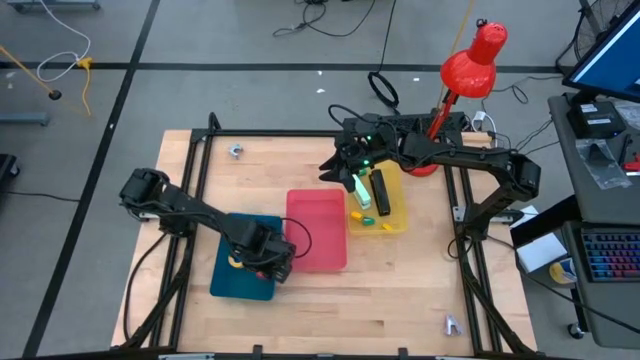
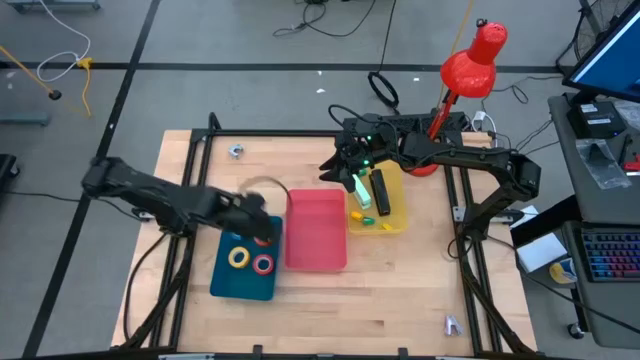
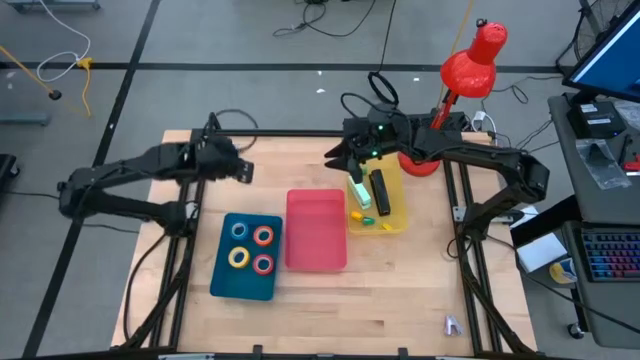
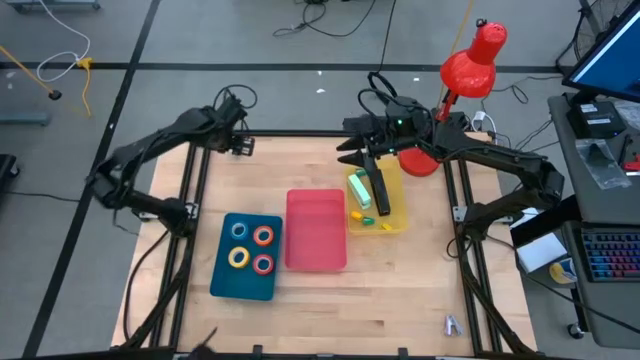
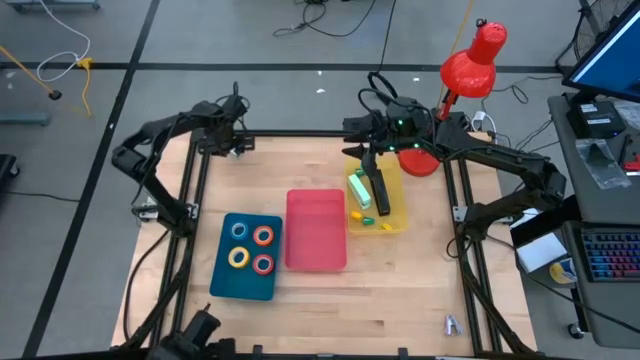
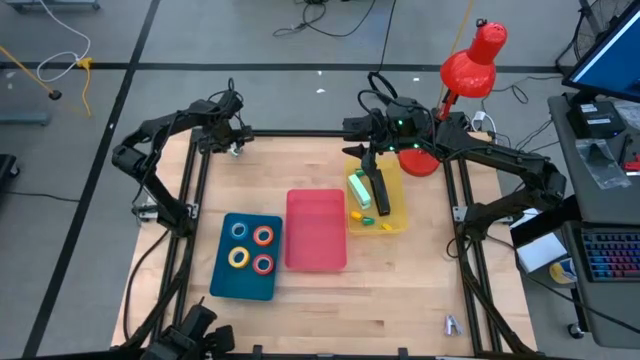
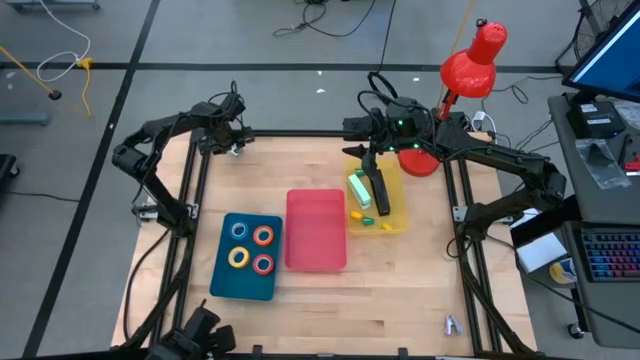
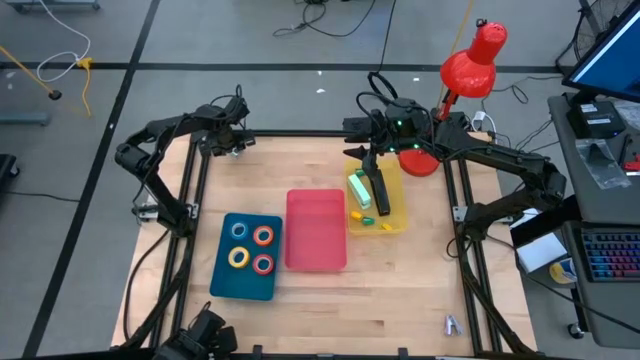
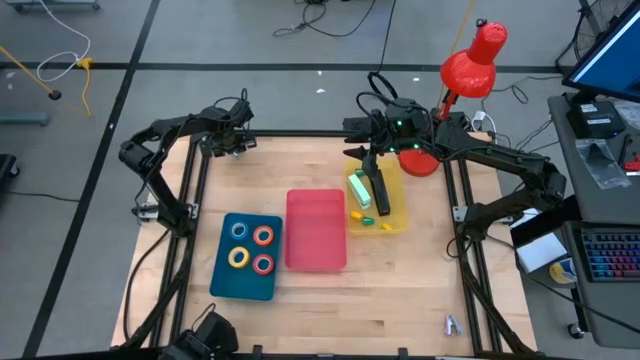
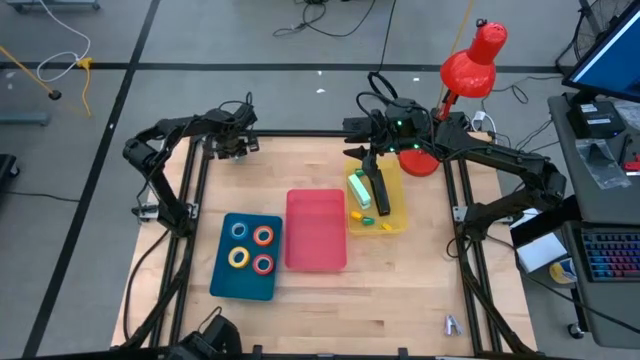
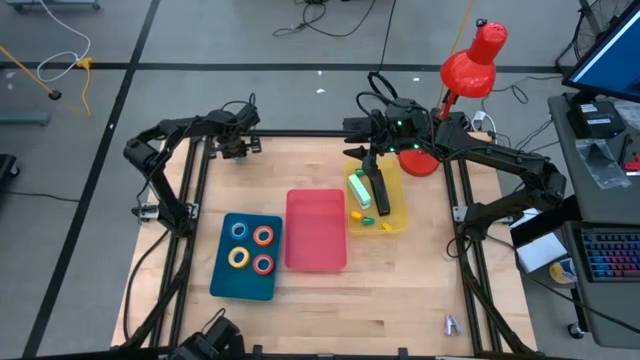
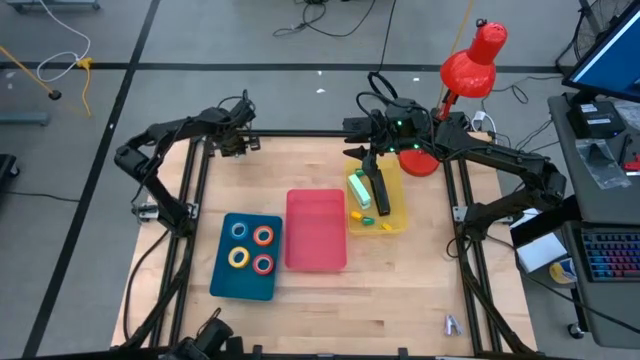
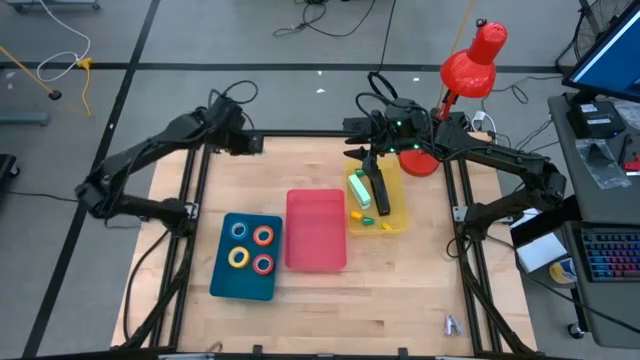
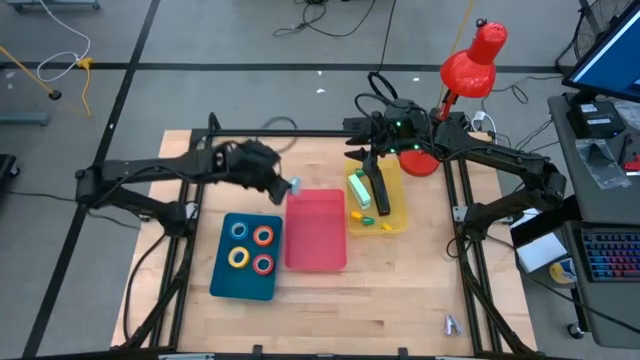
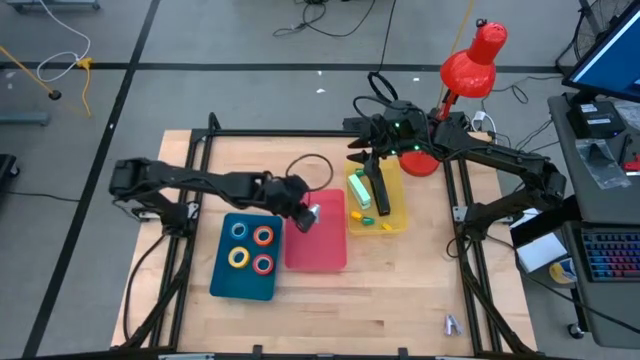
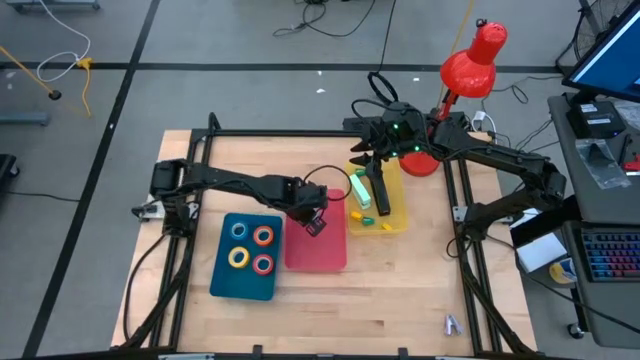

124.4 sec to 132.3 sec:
Task: Pick and place Stapler, Stapler remover, tape
Put the blue staple remover into the yellow bin

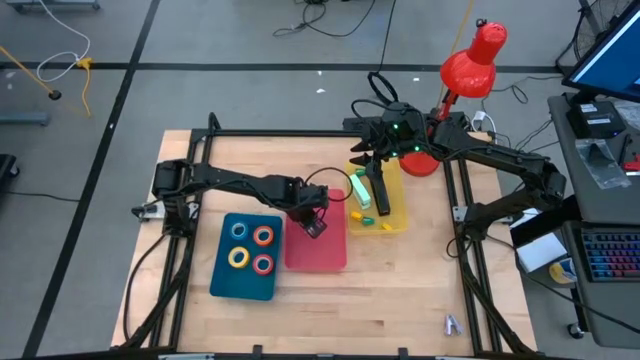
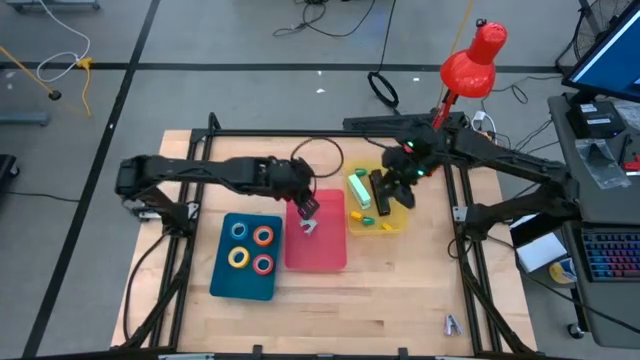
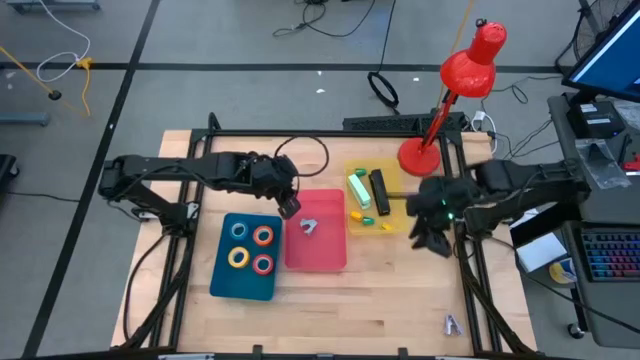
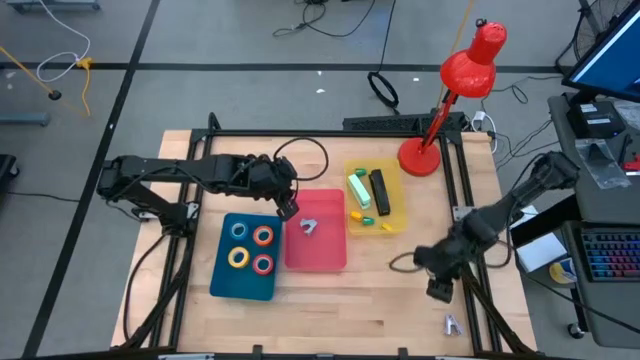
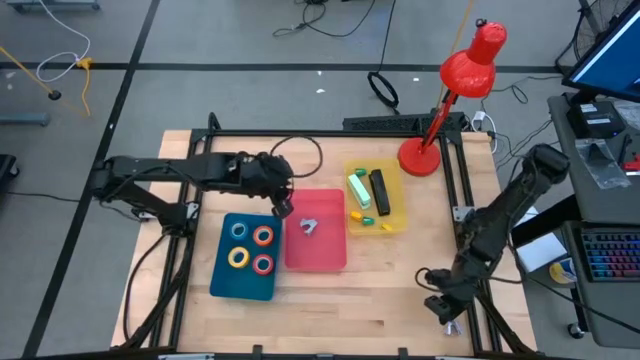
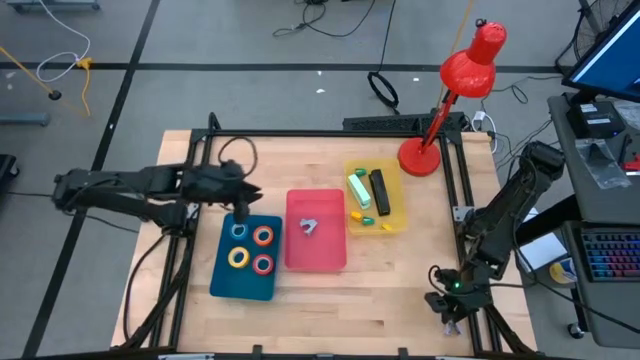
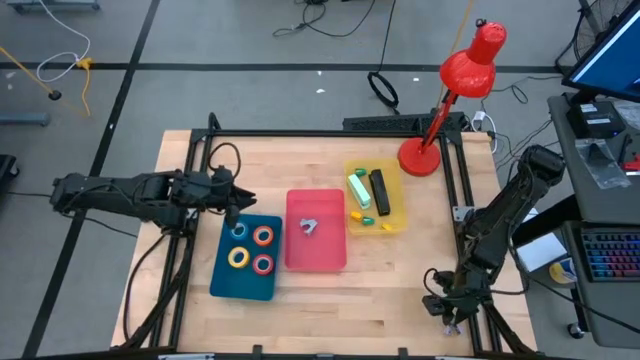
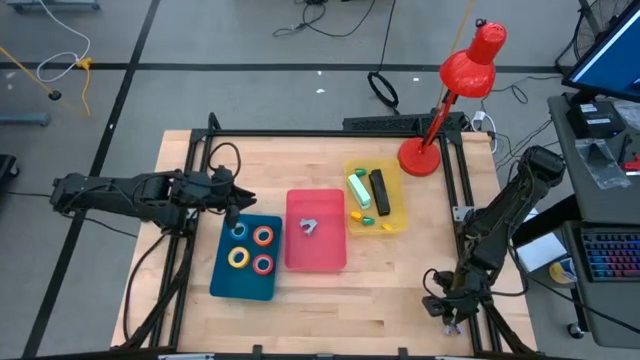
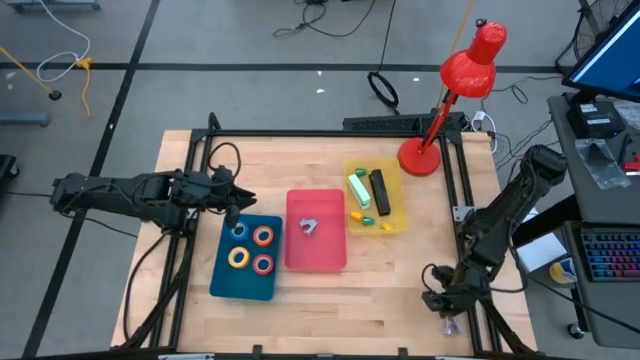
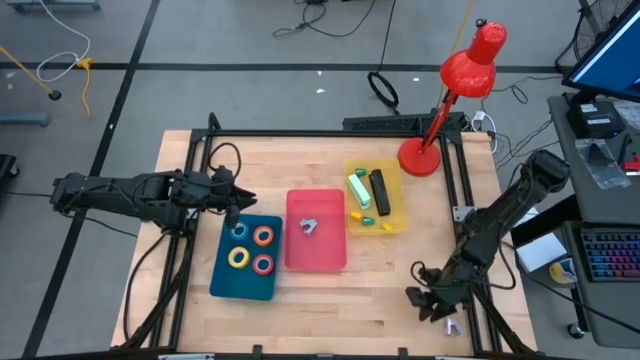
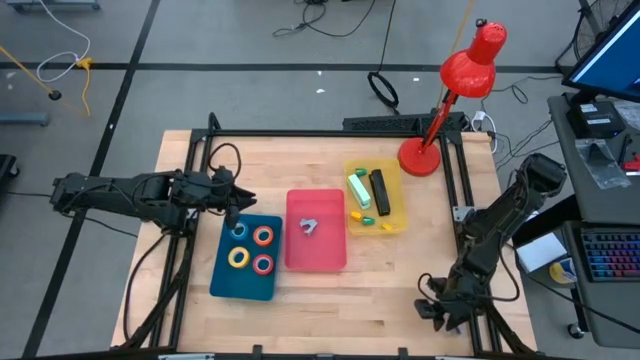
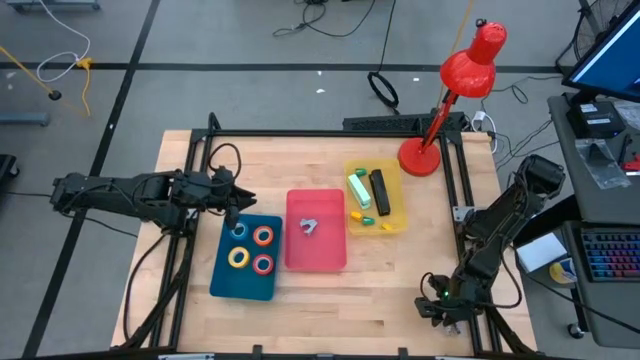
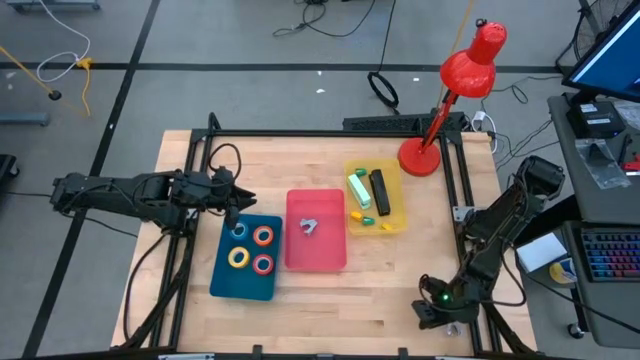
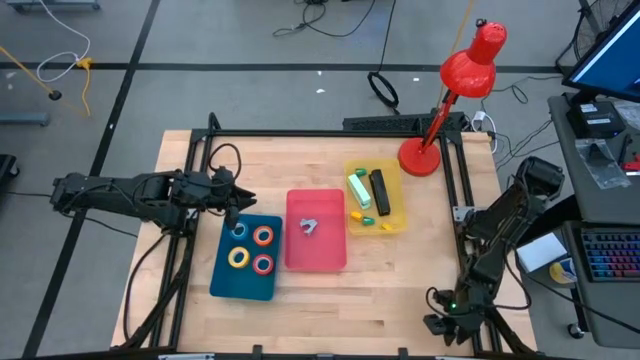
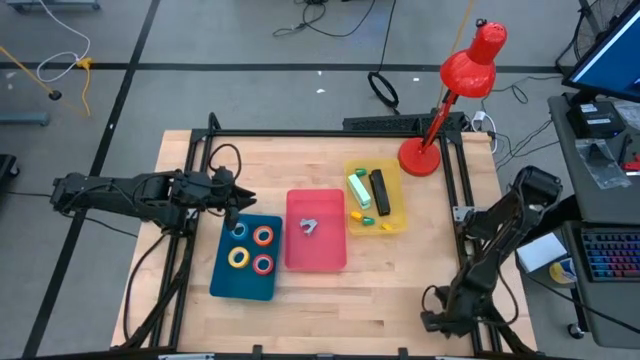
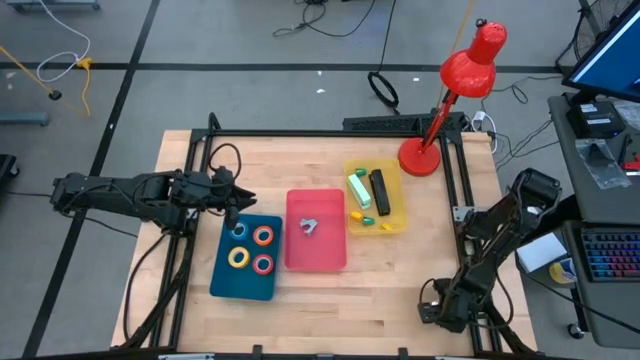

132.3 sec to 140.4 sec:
Put the purple staple remover into the yellow bin

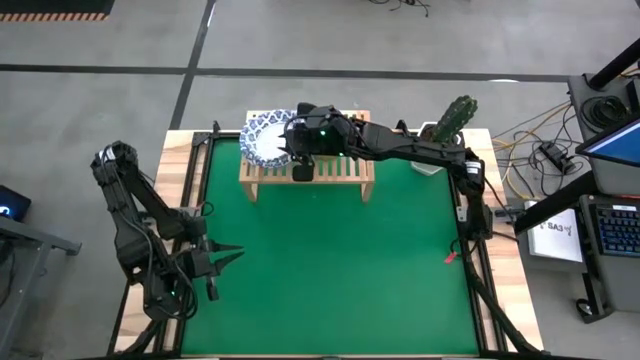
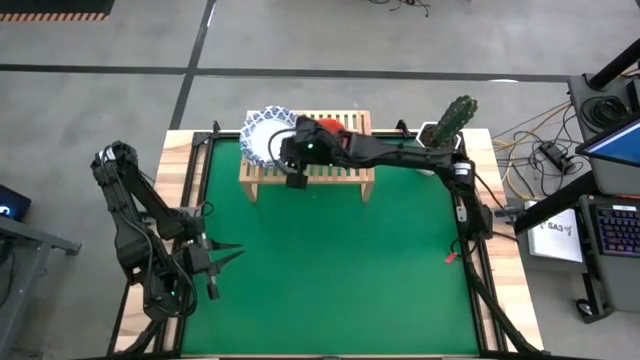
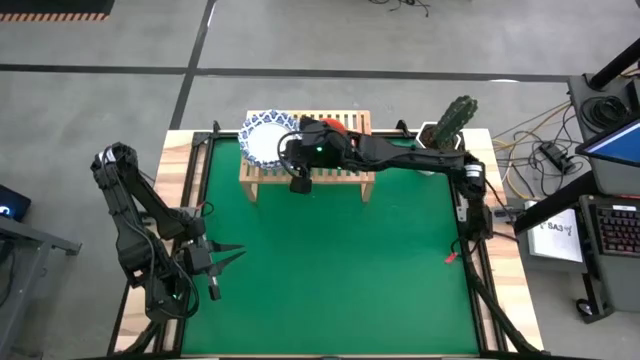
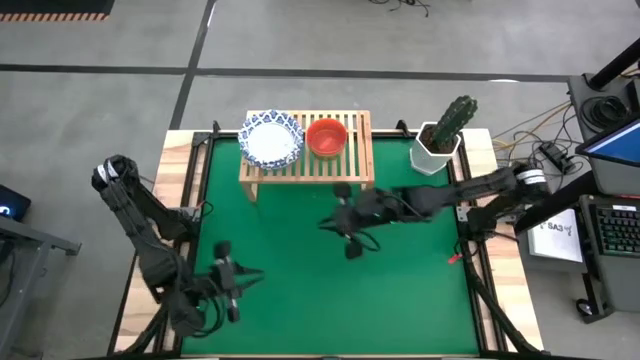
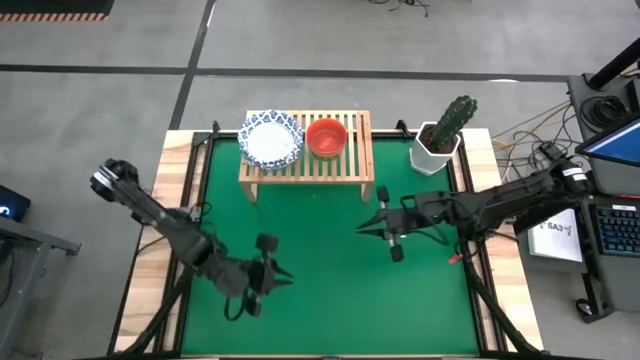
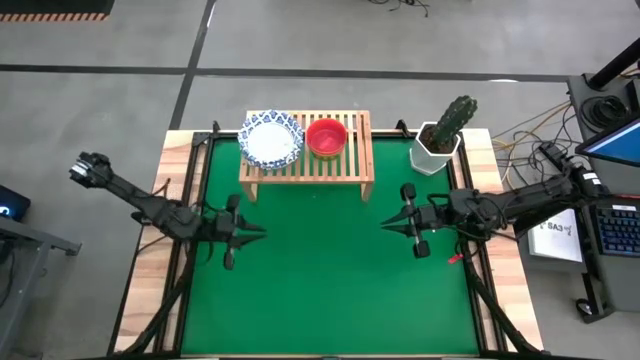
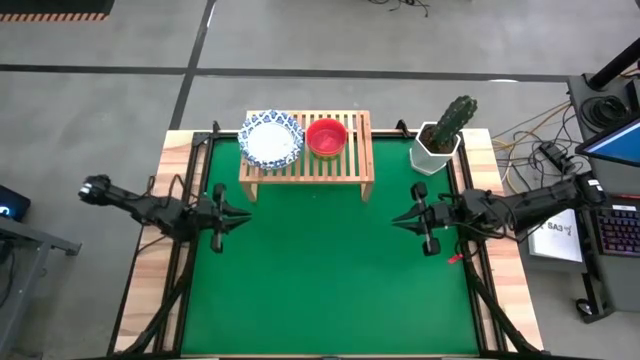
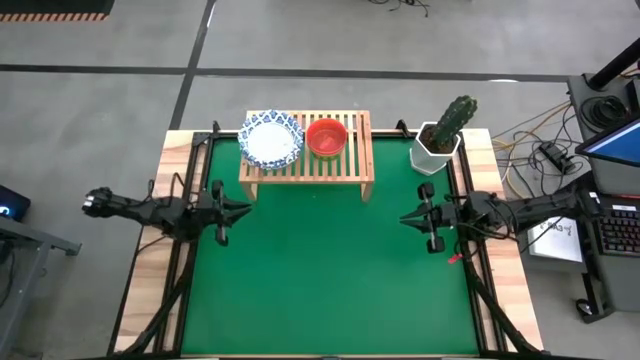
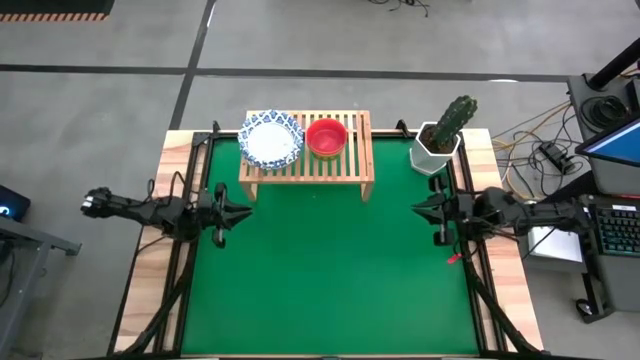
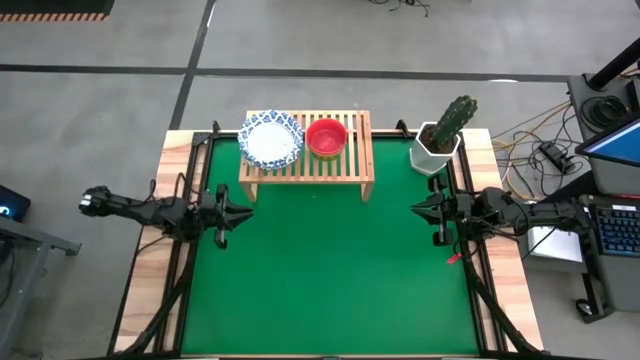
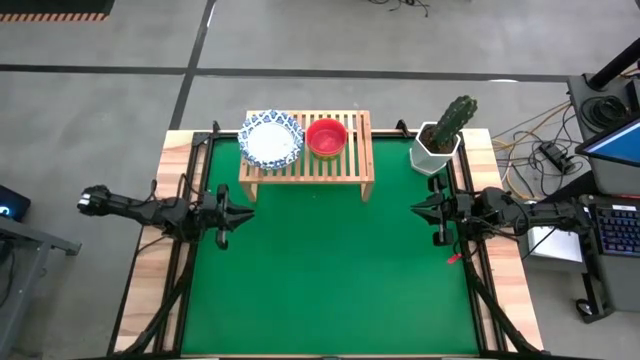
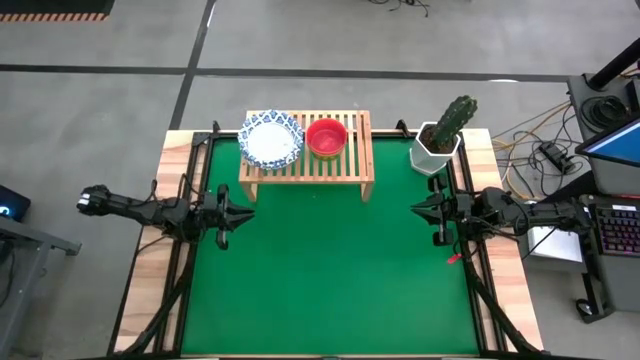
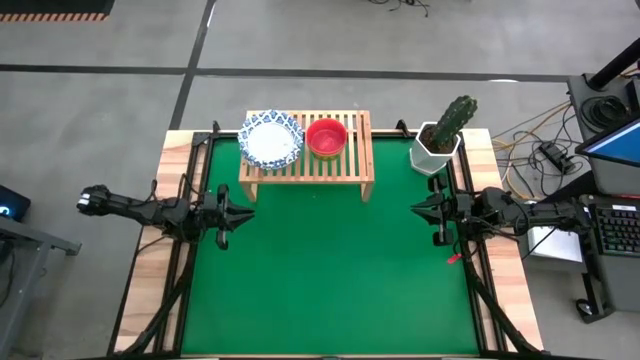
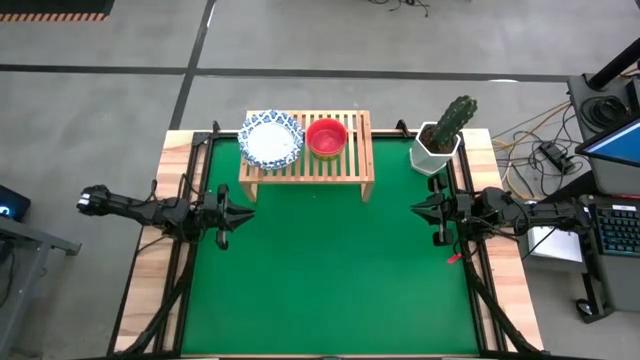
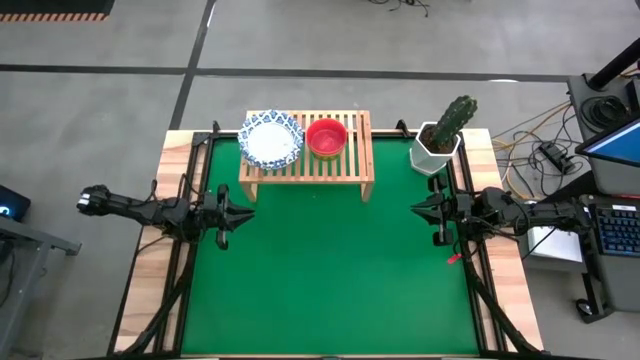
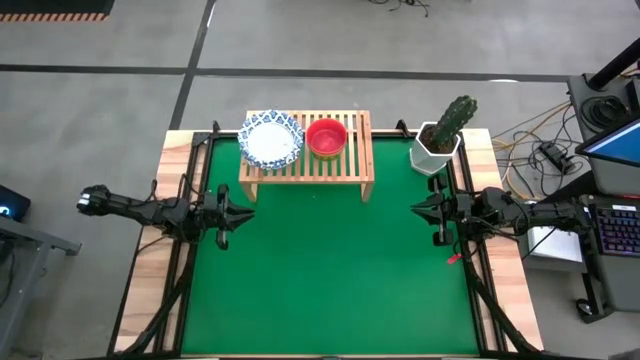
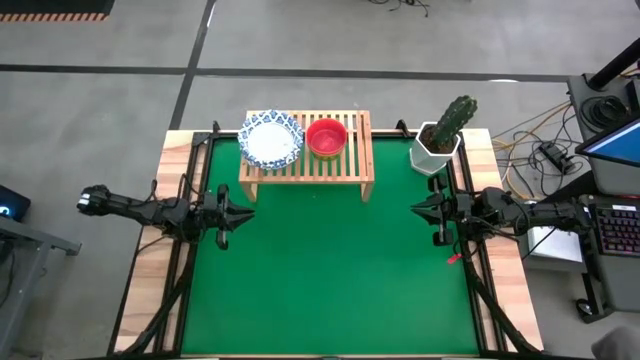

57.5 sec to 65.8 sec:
Task: Place and stack bowls onto a shelf
Return to Home Position
